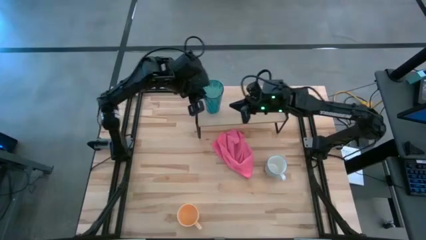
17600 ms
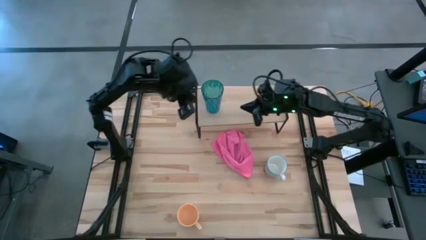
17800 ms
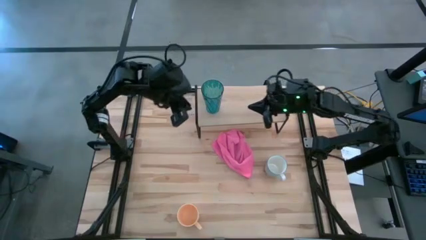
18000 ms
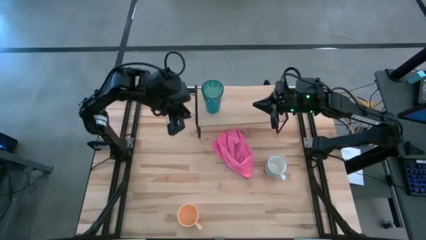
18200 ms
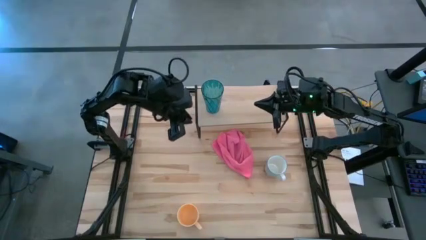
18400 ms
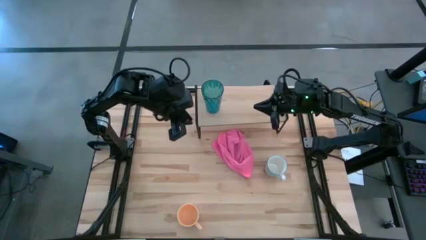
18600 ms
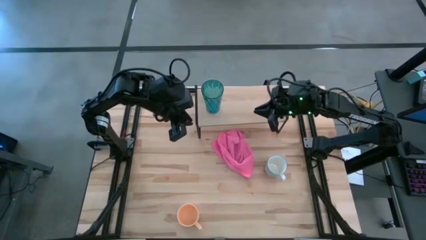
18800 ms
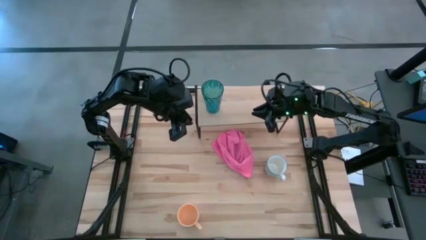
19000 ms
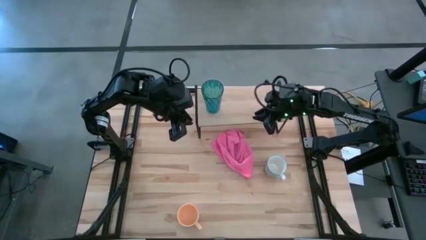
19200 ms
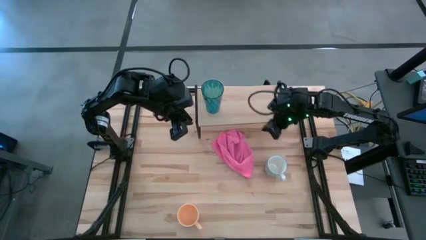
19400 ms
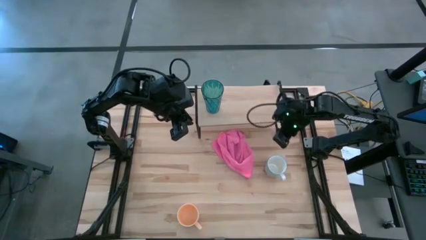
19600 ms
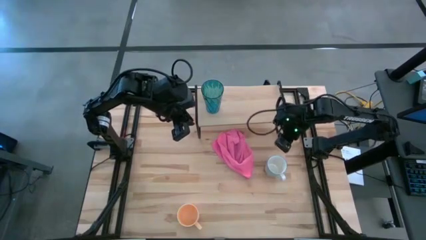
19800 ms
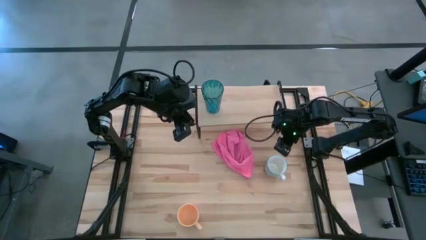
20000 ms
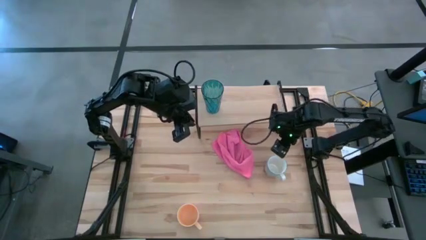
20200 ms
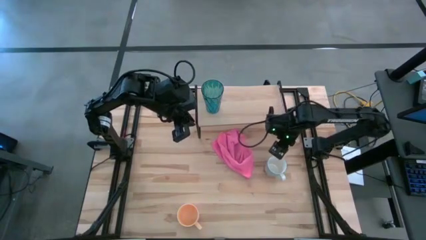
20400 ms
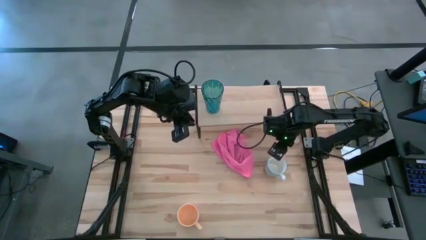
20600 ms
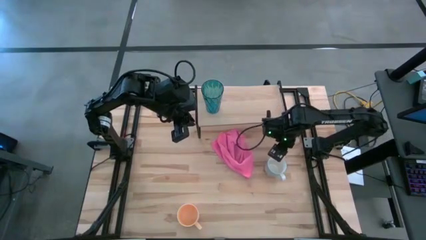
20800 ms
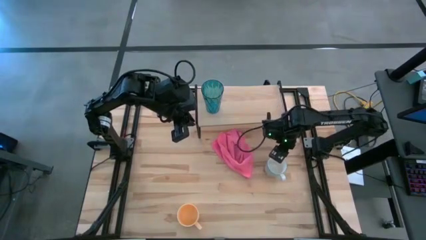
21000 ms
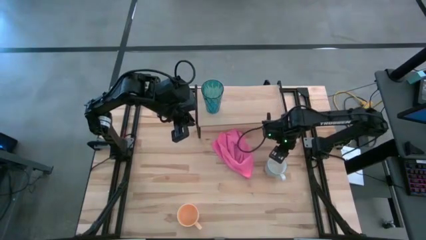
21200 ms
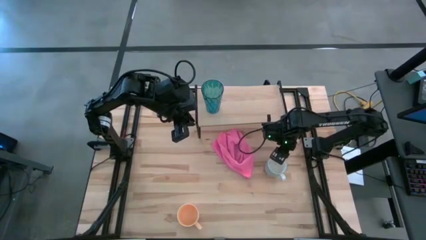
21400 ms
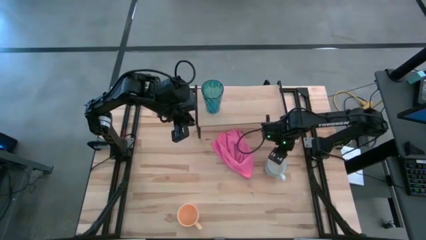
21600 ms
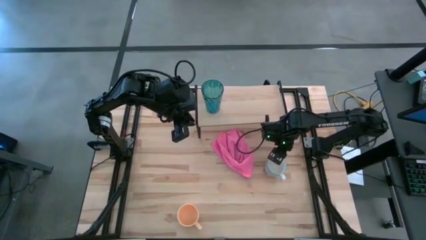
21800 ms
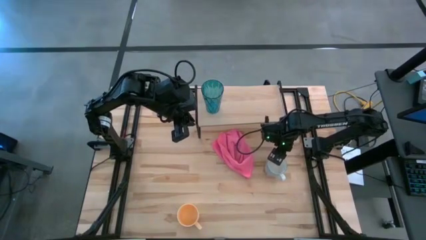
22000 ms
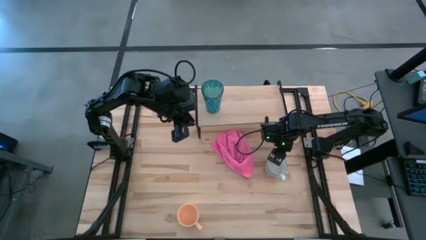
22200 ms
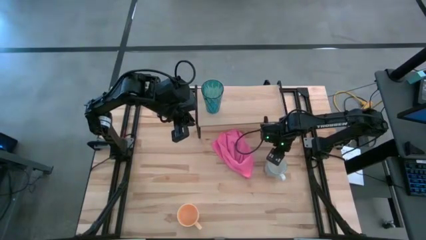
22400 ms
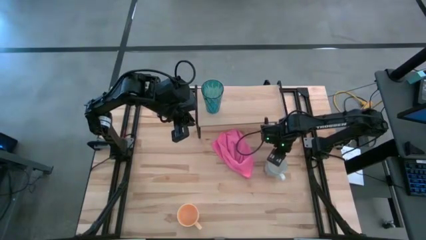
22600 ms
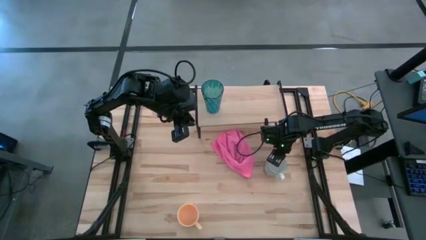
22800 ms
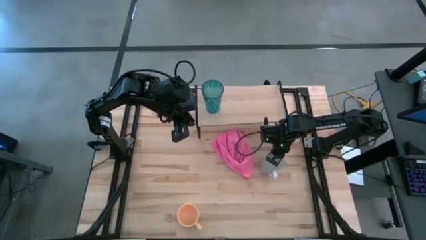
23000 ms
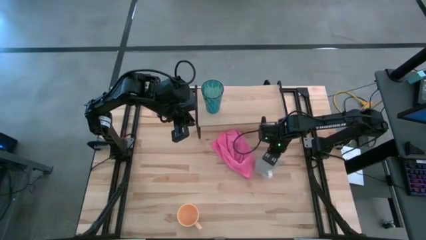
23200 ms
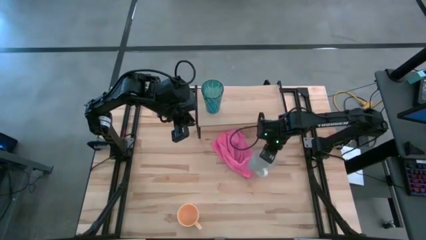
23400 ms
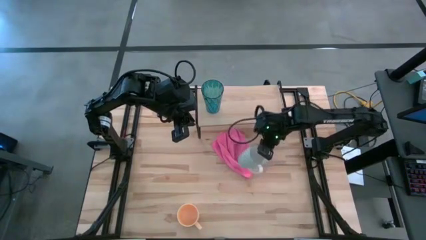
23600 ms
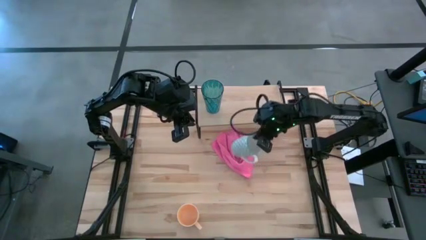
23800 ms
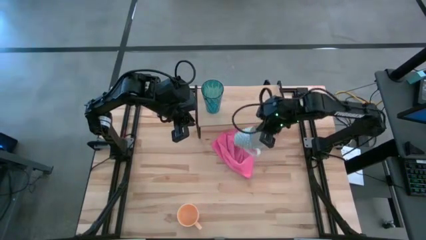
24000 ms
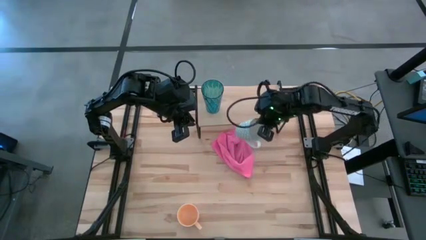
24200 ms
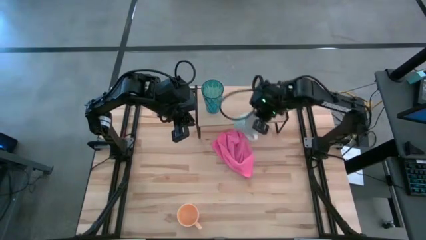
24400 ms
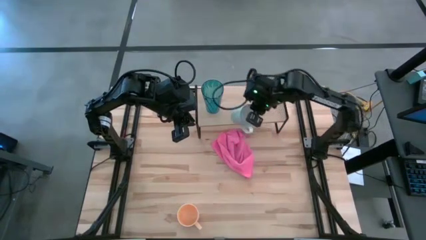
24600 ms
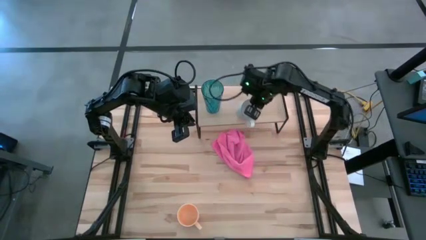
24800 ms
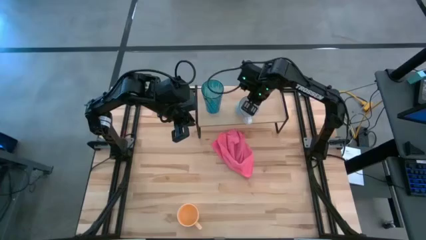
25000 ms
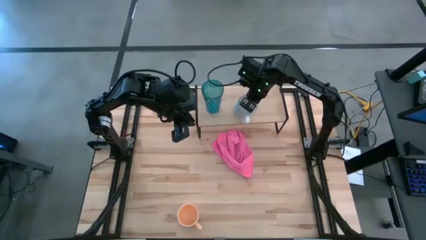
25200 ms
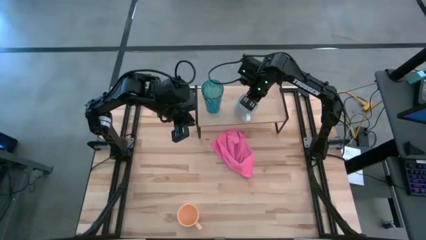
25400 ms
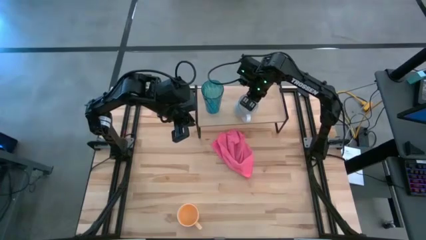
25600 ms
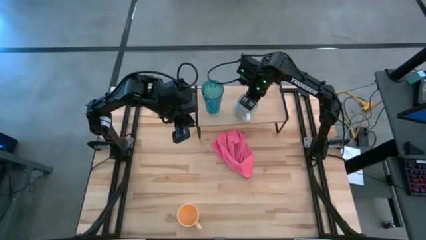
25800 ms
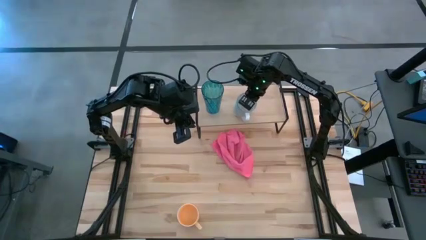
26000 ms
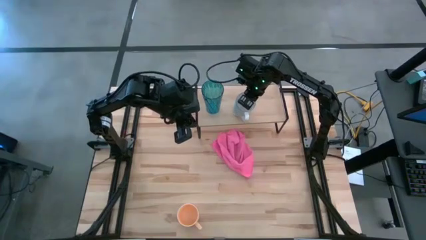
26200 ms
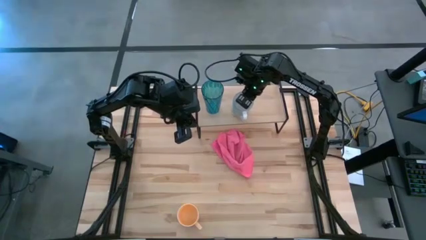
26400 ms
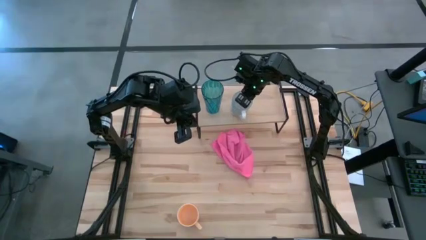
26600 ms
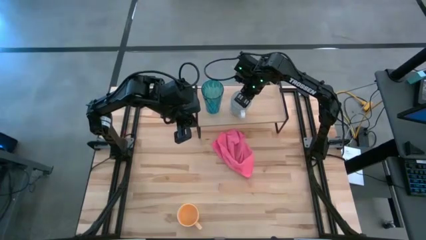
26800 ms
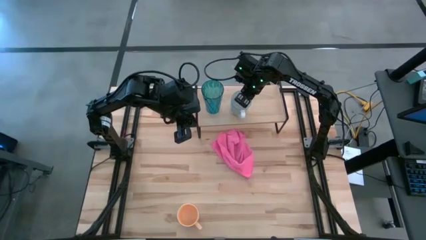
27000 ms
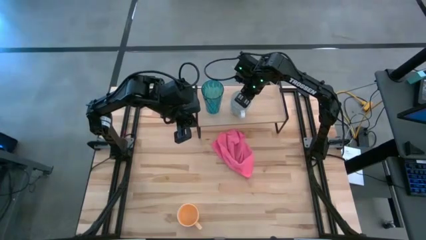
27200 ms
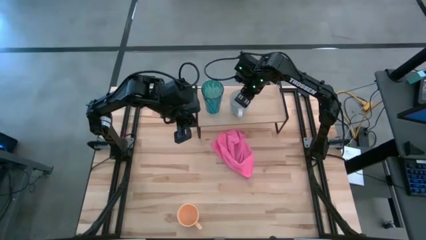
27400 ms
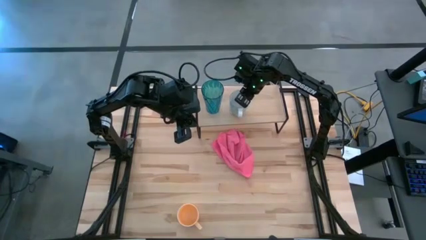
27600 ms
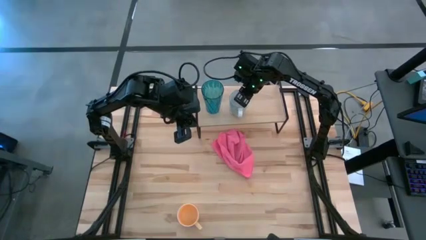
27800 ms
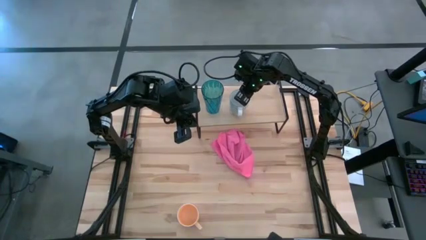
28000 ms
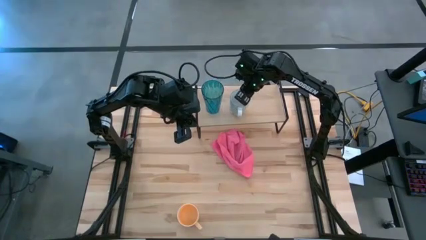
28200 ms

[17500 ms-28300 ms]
Task: Stack small to large cups/mugs on shelf
Put the gray and white patterned cup on the shelf
